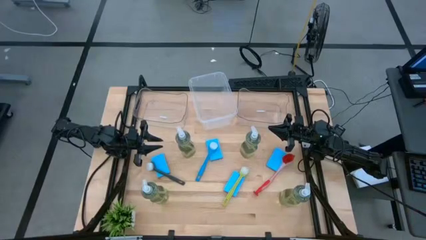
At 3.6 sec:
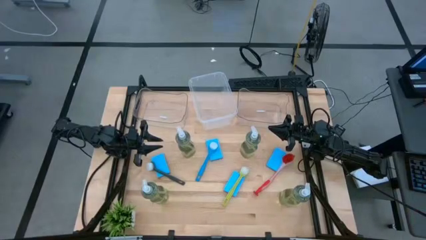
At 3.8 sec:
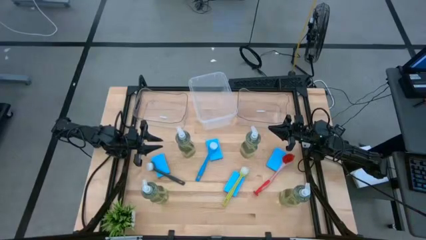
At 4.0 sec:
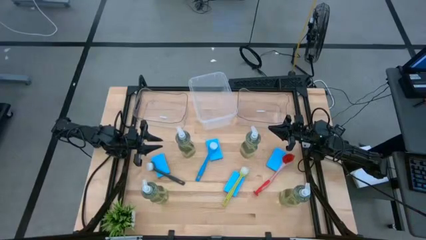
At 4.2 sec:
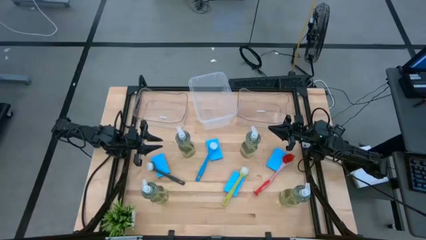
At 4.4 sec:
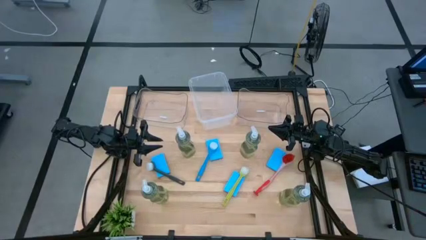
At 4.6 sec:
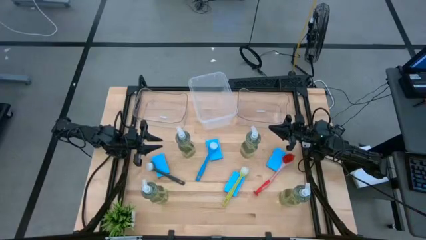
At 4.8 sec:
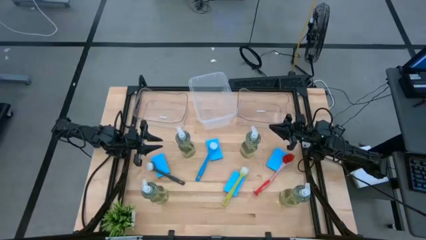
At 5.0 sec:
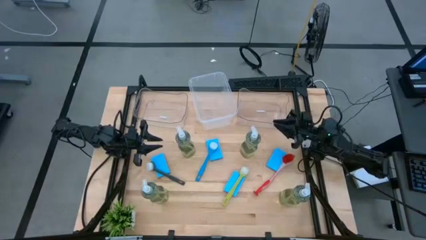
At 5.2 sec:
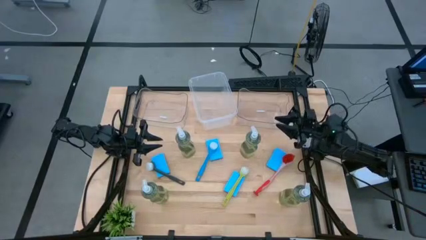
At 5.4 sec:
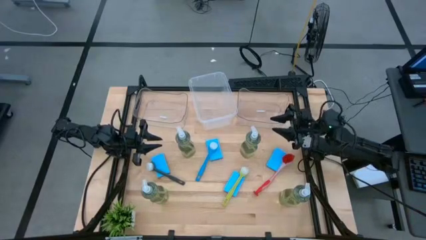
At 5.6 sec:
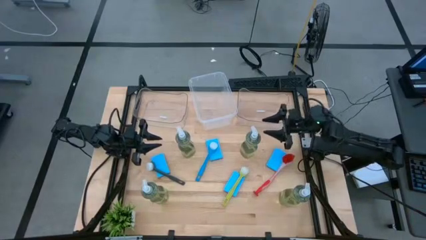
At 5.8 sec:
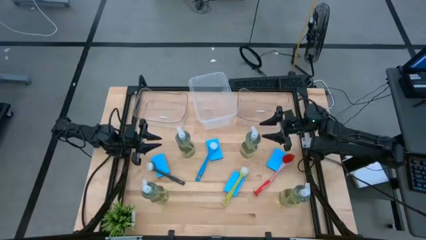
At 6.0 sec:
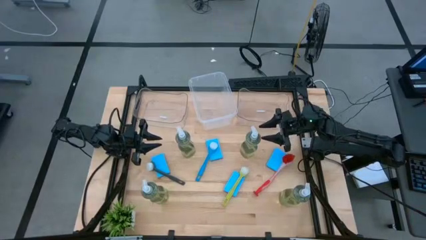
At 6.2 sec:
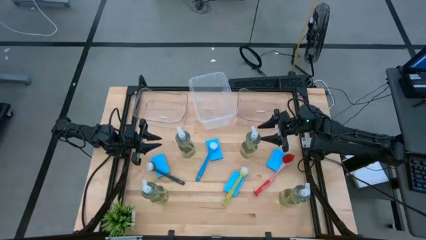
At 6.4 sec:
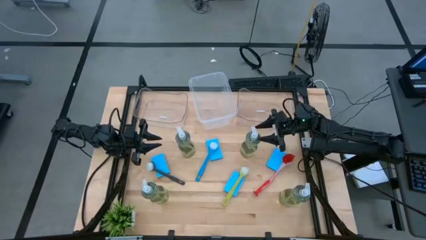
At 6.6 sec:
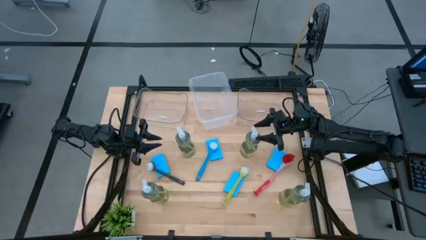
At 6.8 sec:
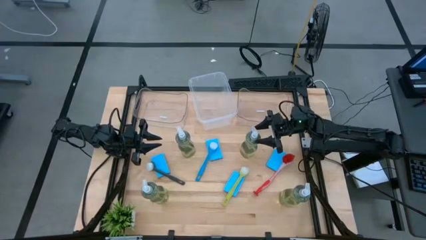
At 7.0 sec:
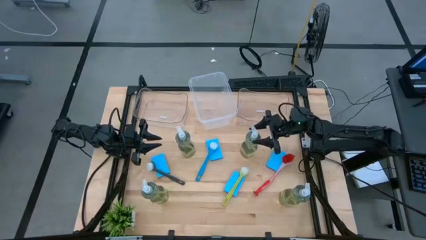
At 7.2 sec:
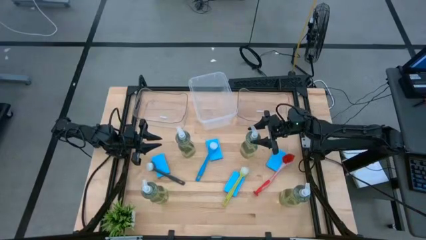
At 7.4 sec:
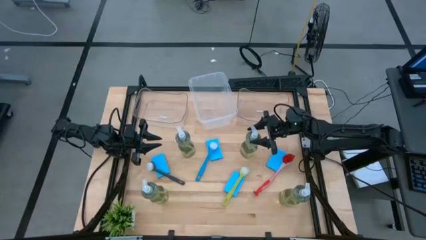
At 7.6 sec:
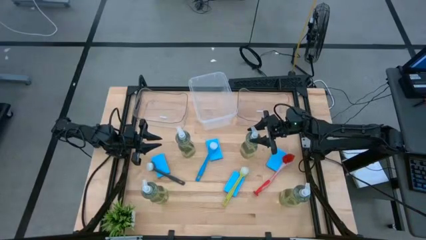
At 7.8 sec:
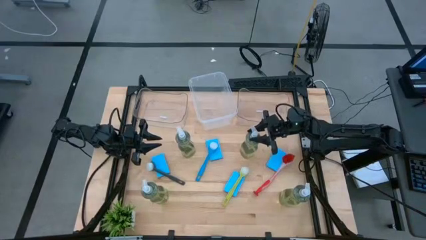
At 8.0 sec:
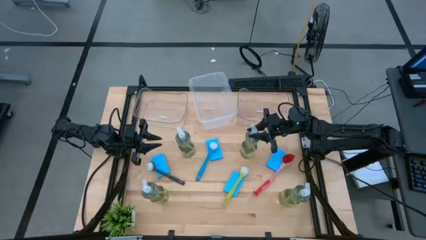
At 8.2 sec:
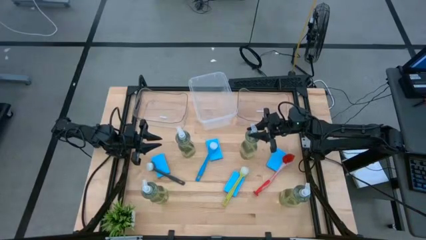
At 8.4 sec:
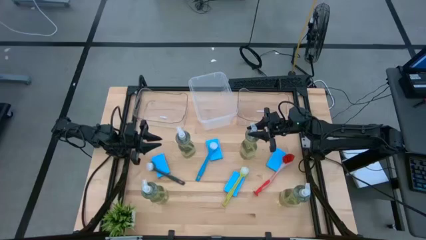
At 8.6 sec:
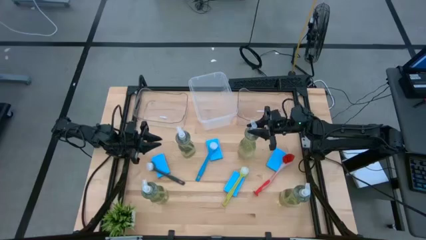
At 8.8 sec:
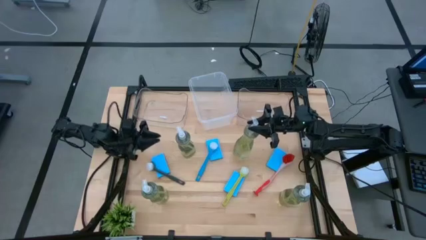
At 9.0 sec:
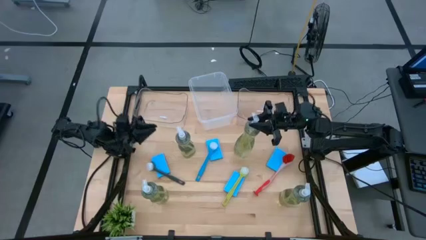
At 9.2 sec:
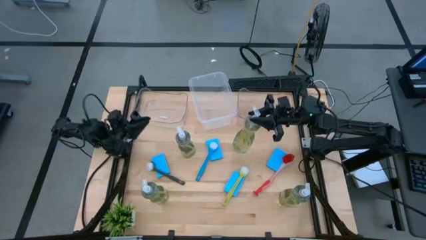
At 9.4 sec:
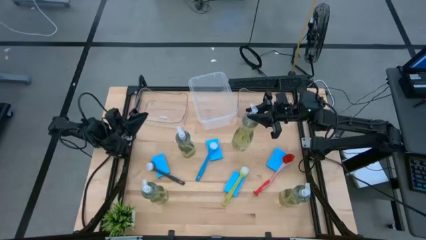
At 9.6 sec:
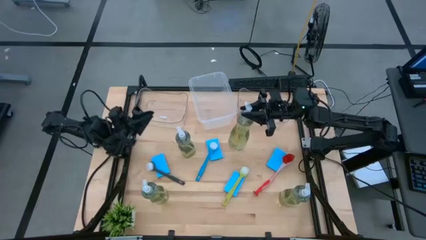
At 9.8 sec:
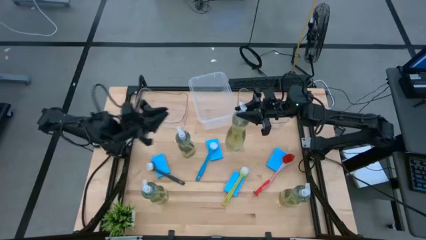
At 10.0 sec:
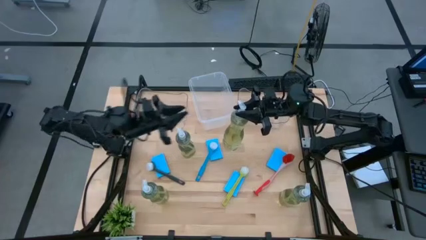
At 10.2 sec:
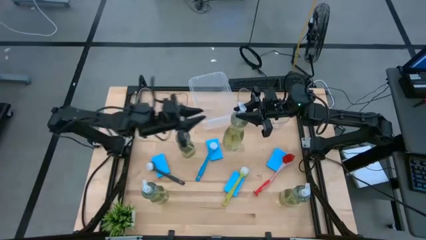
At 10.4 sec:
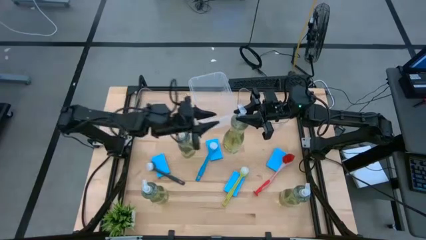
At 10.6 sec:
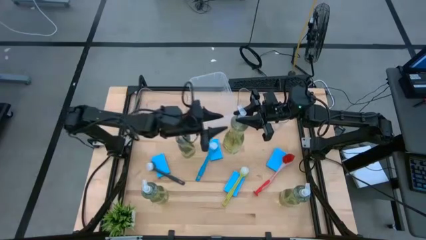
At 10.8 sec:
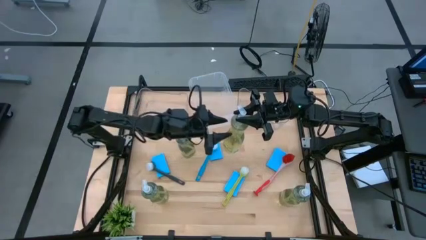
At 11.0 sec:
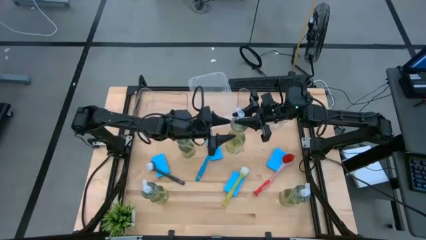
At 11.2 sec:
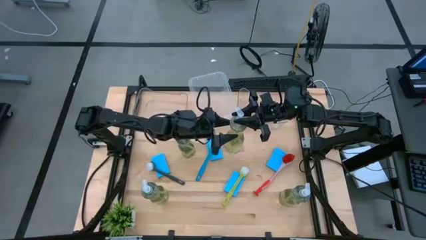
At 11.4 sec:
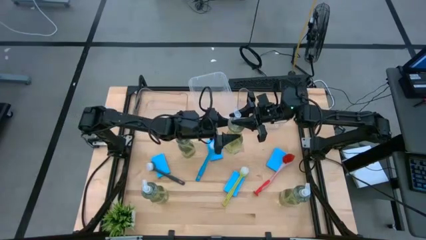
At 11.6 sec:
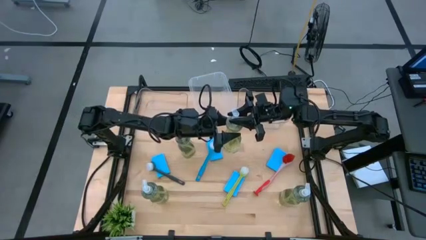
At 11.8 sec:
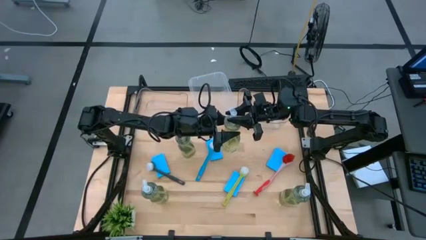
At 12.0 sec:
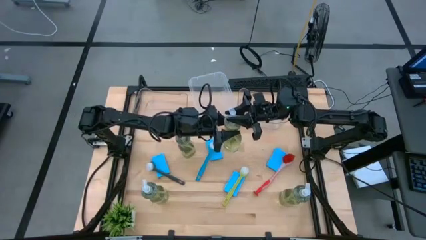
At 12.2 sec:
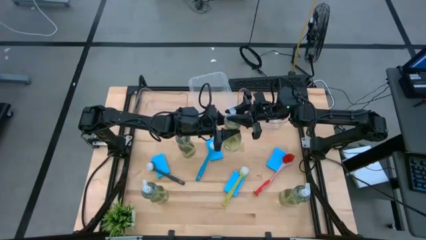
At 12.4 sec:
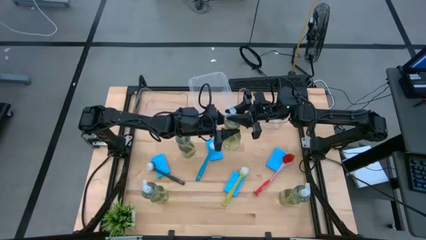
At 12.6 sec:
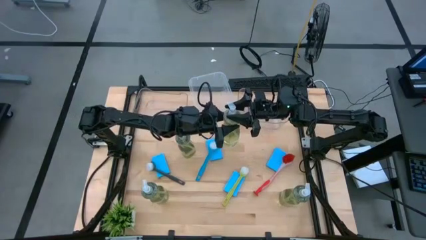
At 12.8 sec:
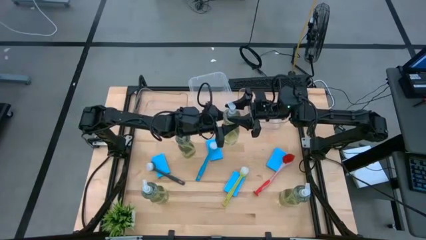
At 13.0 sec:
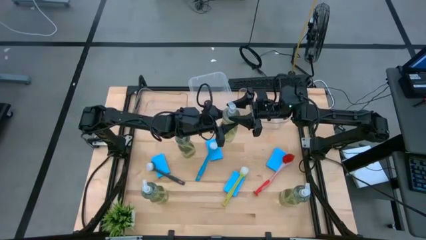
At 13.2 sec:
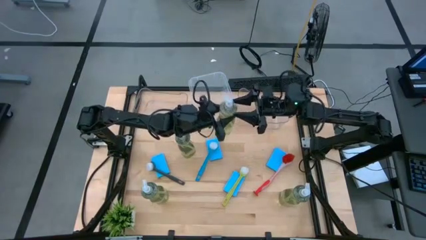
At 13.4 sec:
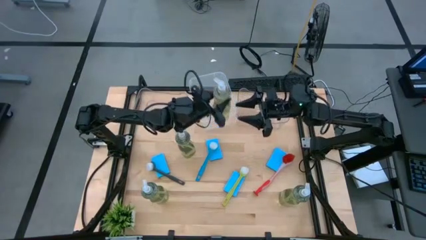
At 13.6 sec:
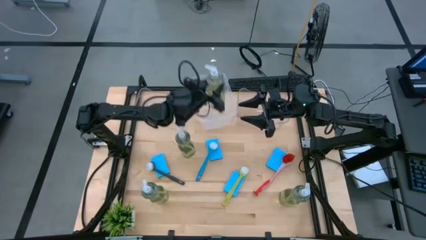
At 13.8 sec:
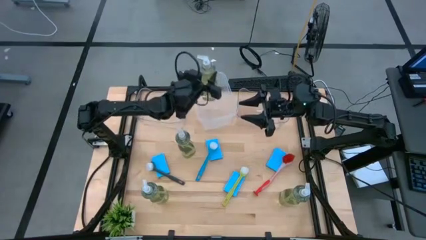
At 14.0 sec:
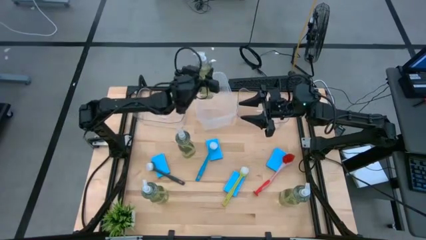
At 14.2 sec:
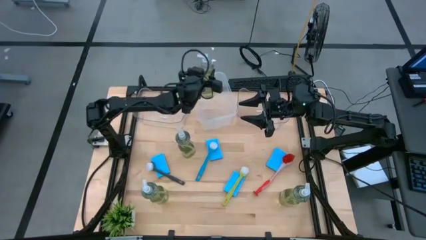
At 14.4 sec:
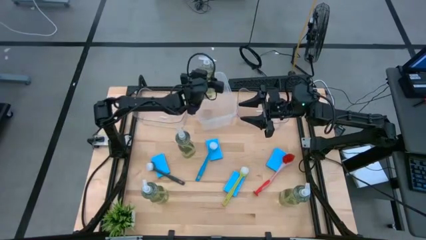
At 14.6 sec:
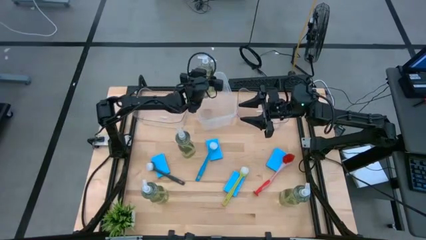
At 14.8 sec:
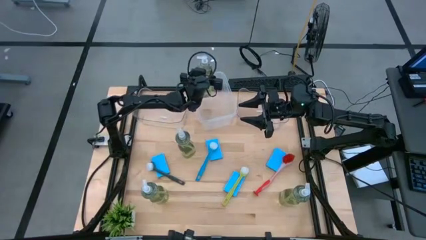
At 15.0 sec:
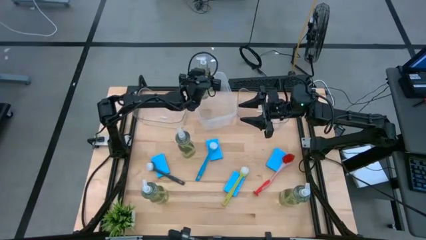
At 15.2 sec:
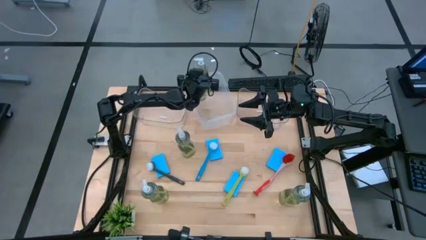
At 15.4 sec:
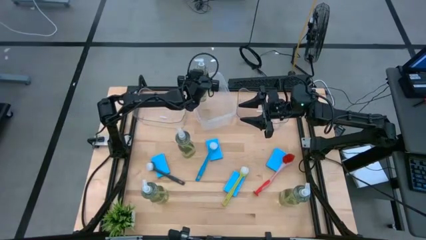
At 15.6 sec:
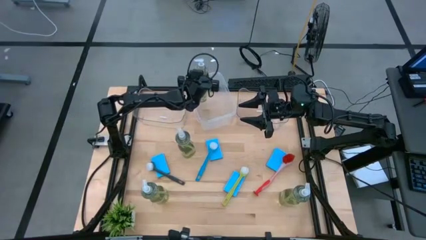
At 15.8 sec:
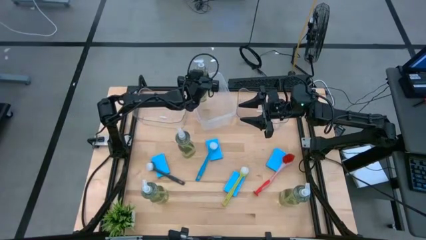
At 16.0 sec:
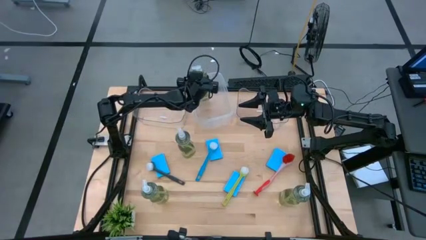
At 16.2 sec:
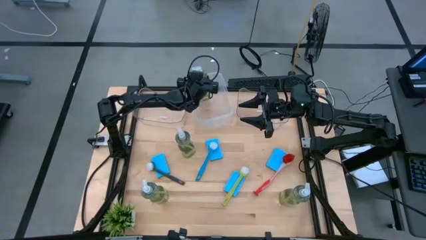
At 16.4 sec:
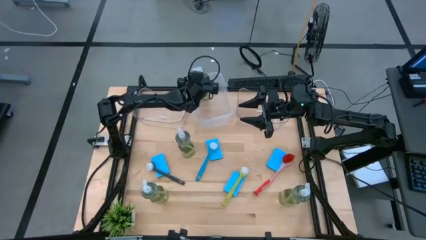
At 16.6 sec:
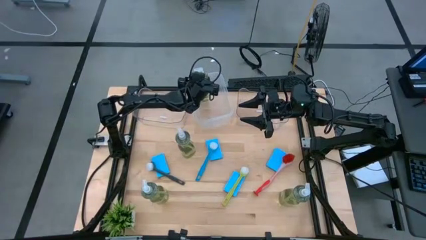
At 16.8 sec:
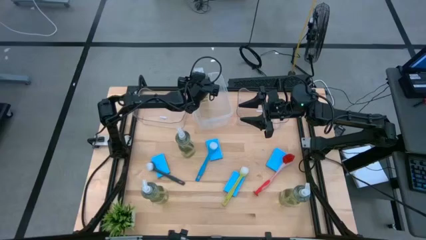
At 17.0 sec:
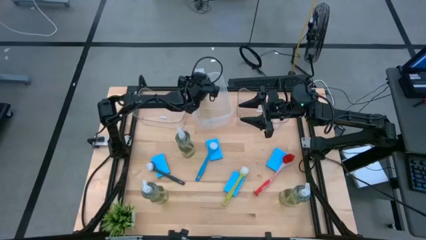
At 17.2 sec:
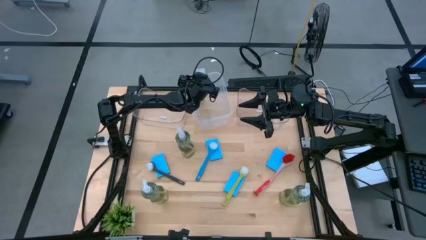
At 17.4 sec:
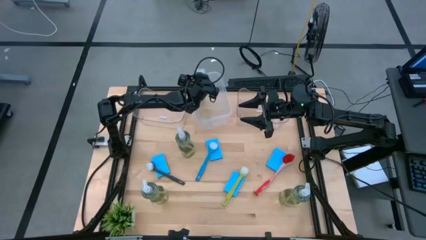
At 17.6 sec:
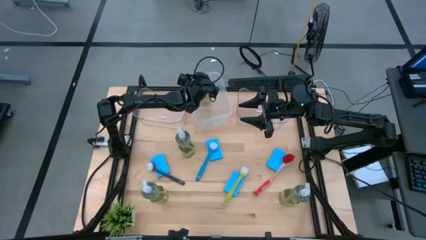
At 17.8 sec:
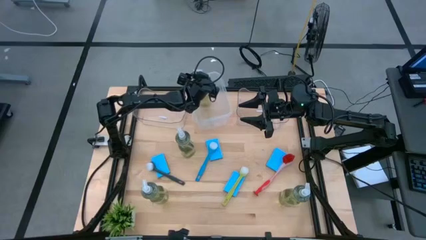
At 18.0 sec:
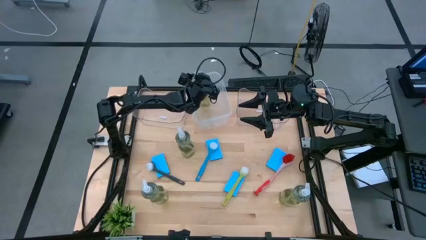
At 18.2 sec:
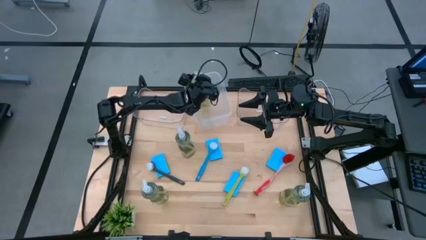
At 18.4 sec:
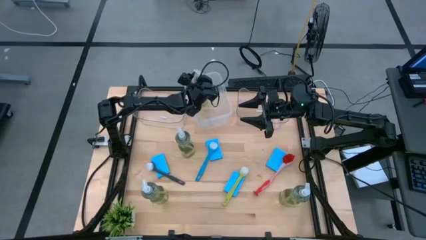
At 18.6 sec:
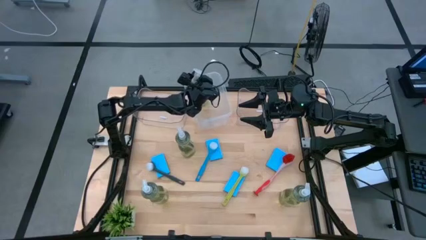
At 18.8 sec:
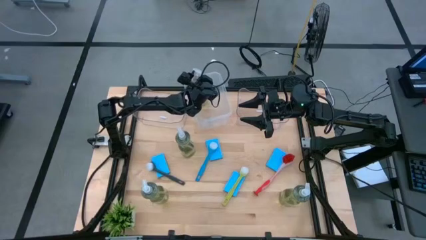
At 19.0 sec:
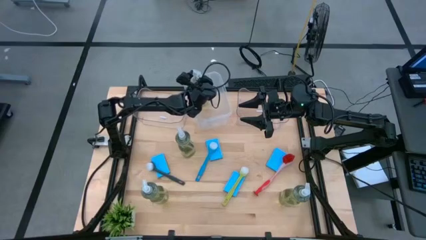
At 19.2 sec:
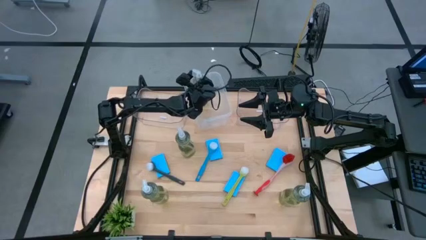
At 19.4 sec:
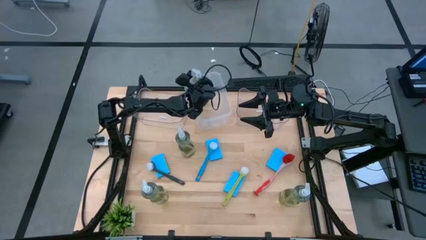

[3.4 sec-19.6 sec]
Task: Pick & Place Kitchen Sink Supplies
Put the dishwashing liquid bottle into the white bin
